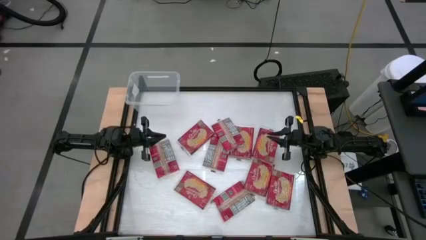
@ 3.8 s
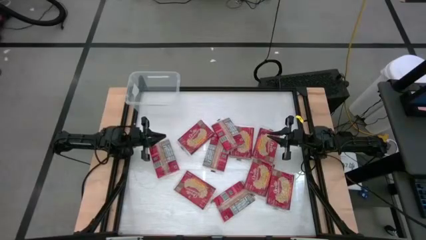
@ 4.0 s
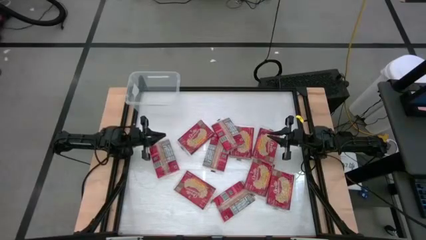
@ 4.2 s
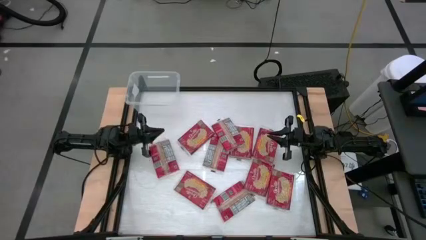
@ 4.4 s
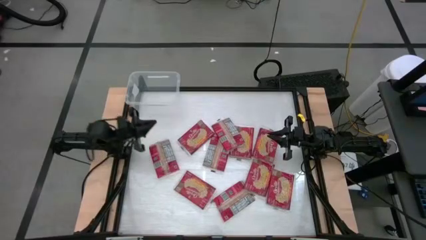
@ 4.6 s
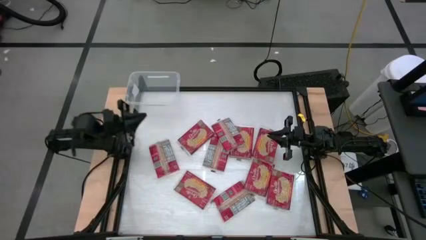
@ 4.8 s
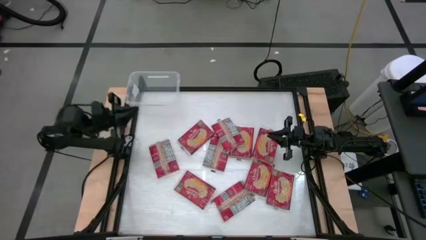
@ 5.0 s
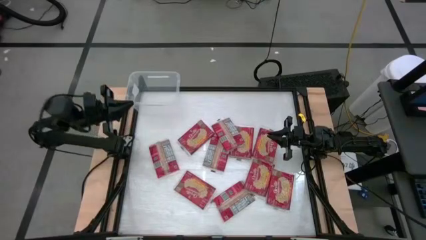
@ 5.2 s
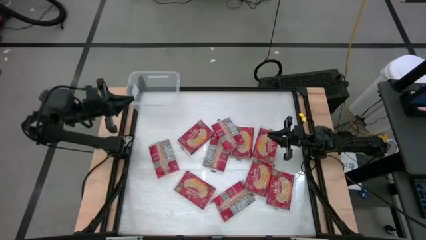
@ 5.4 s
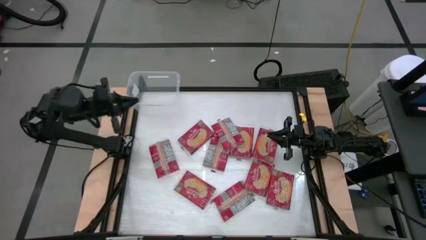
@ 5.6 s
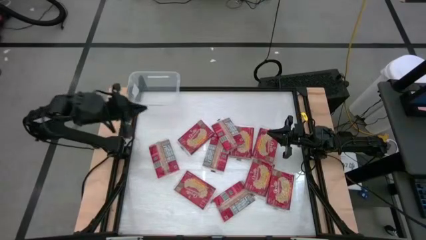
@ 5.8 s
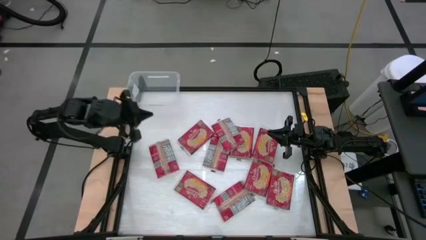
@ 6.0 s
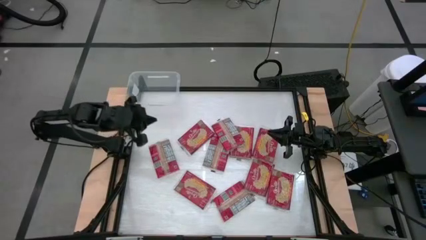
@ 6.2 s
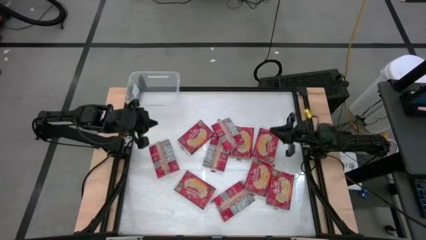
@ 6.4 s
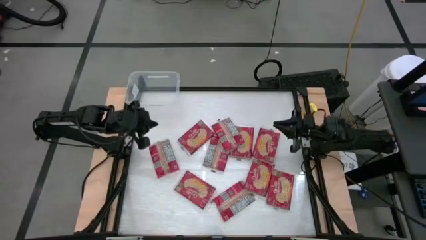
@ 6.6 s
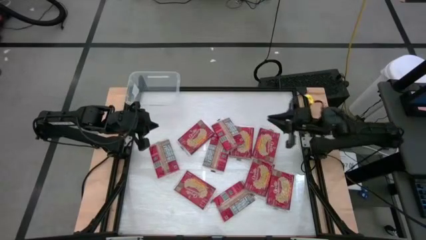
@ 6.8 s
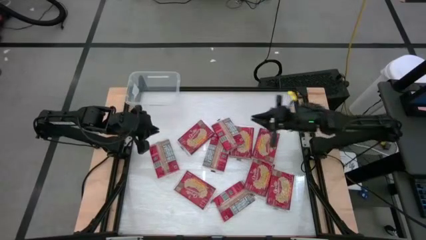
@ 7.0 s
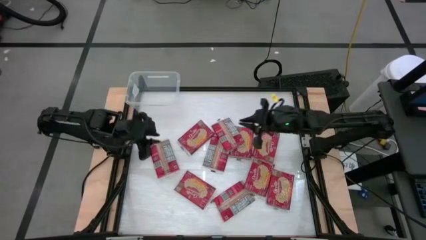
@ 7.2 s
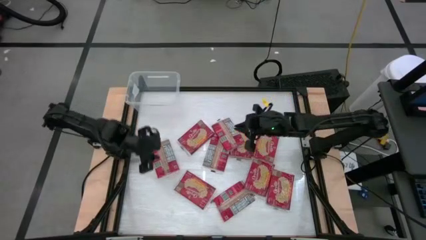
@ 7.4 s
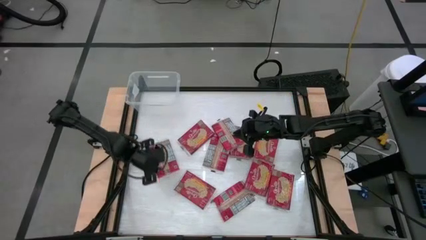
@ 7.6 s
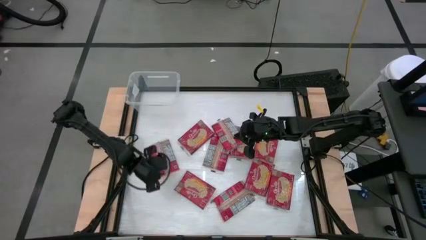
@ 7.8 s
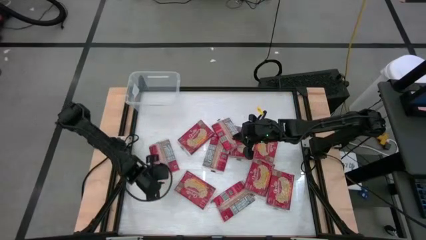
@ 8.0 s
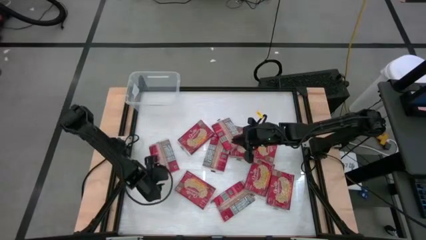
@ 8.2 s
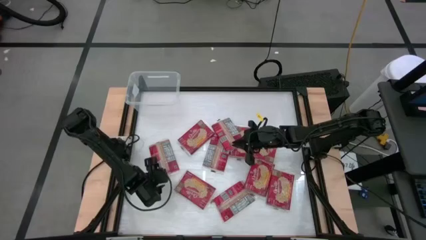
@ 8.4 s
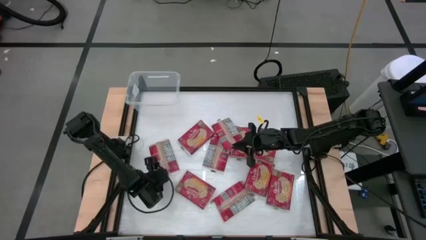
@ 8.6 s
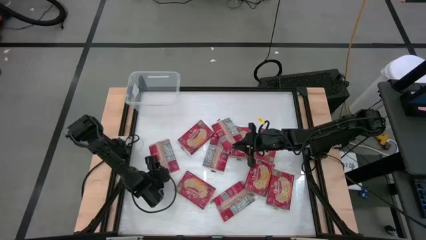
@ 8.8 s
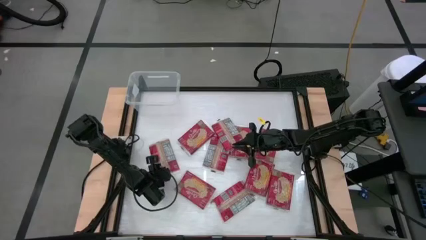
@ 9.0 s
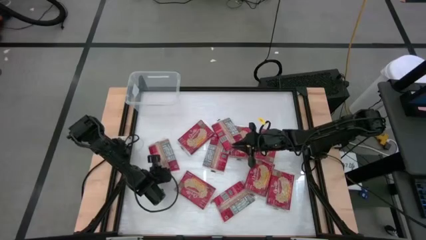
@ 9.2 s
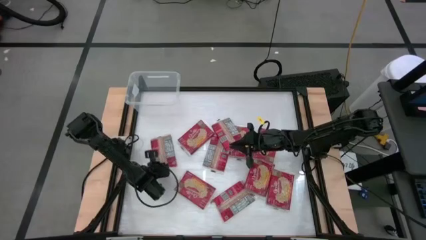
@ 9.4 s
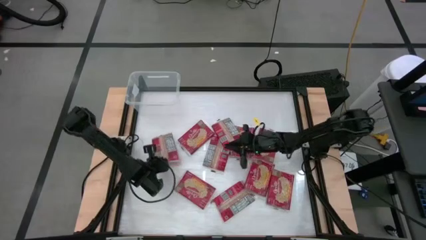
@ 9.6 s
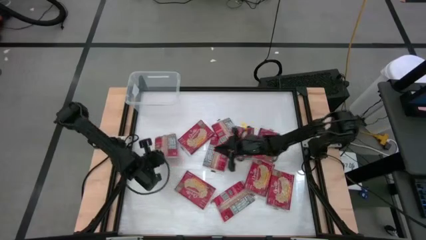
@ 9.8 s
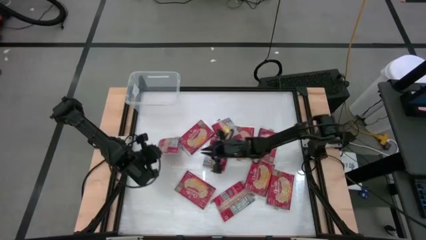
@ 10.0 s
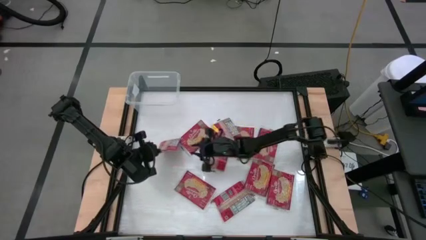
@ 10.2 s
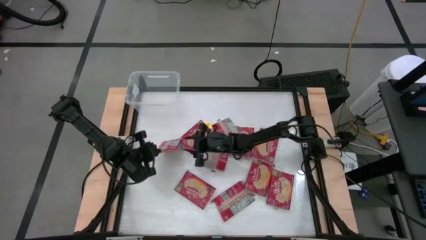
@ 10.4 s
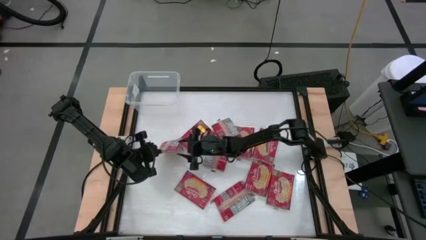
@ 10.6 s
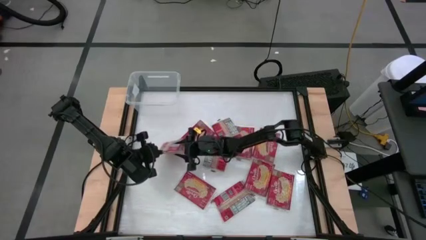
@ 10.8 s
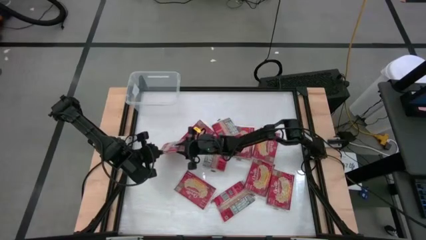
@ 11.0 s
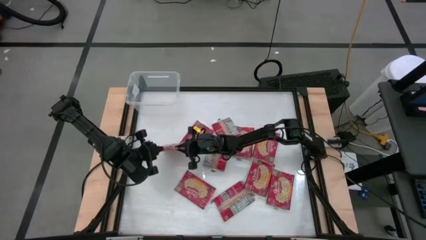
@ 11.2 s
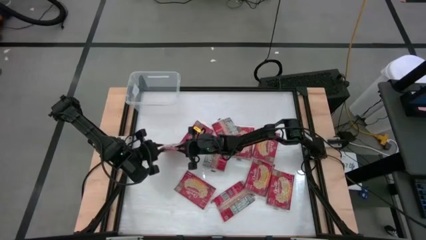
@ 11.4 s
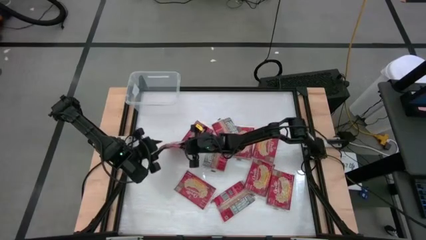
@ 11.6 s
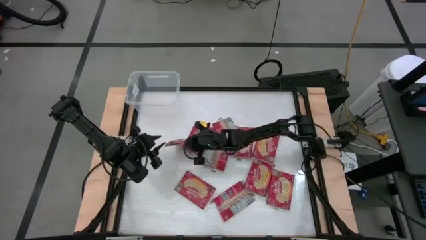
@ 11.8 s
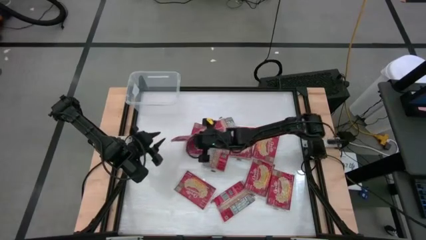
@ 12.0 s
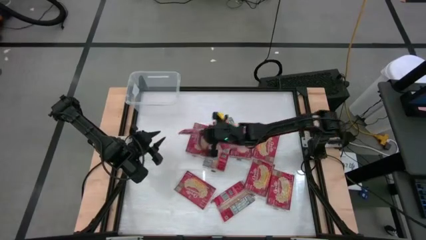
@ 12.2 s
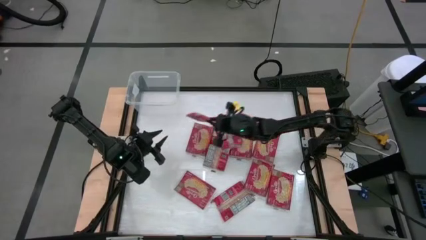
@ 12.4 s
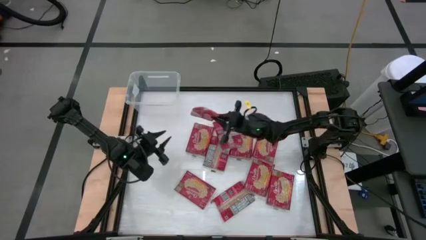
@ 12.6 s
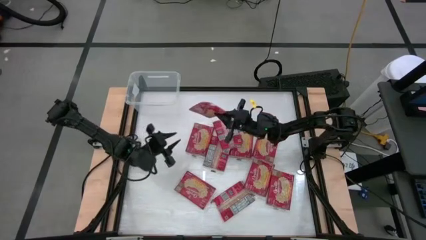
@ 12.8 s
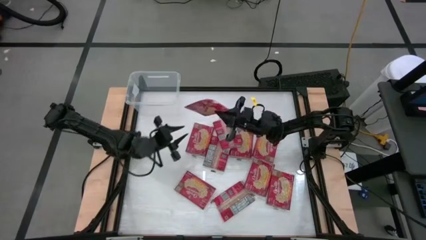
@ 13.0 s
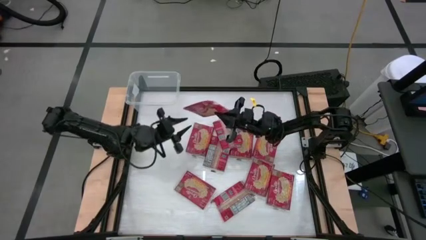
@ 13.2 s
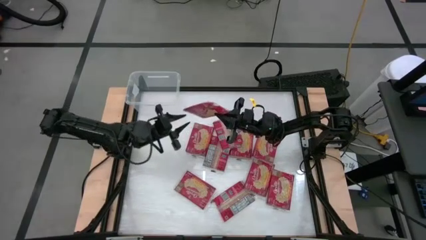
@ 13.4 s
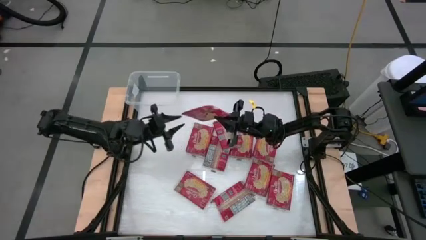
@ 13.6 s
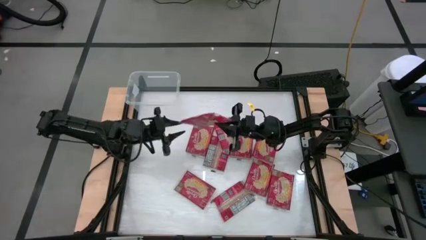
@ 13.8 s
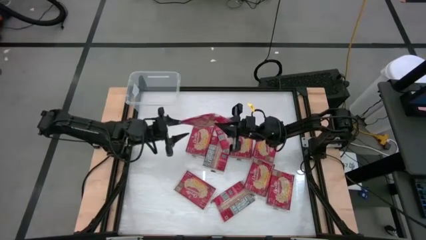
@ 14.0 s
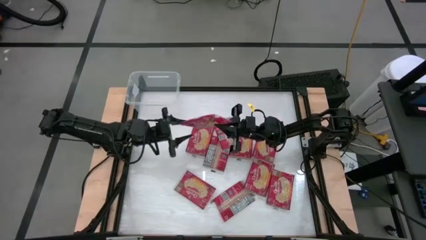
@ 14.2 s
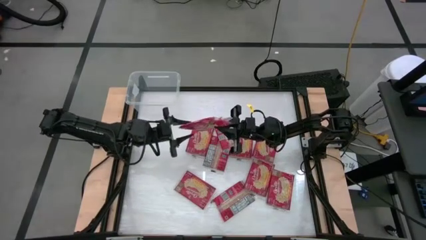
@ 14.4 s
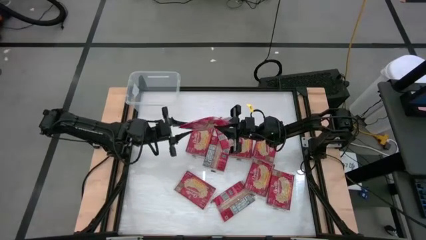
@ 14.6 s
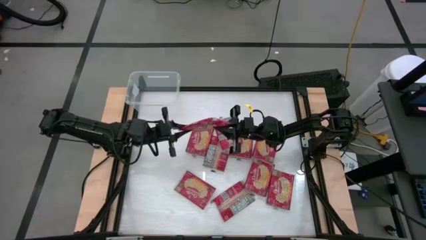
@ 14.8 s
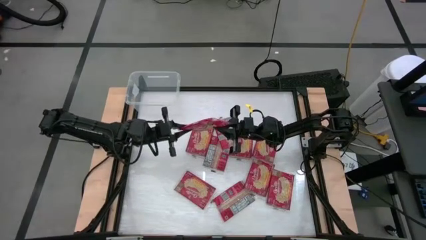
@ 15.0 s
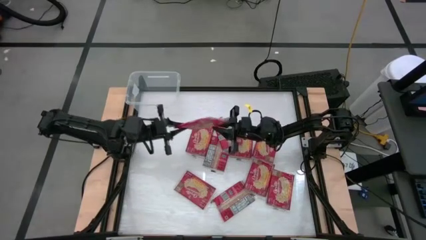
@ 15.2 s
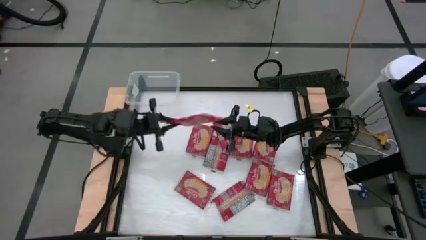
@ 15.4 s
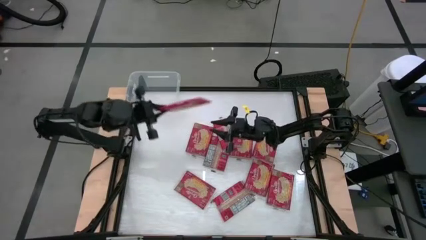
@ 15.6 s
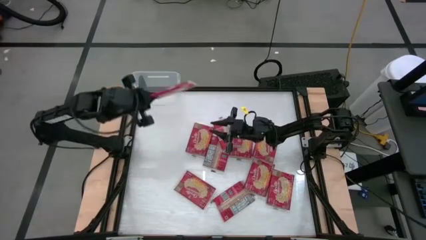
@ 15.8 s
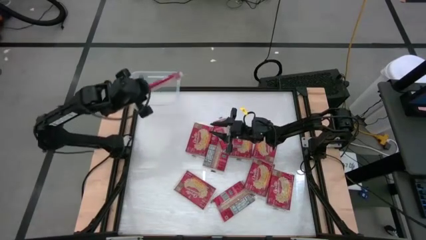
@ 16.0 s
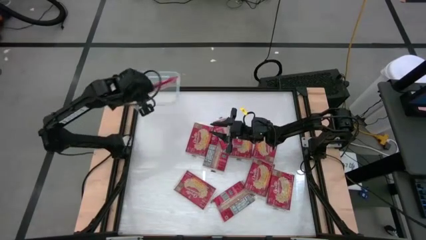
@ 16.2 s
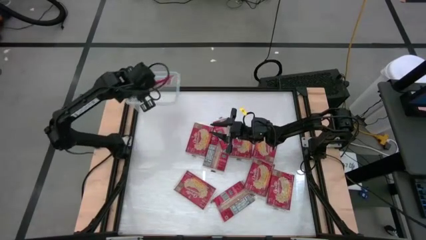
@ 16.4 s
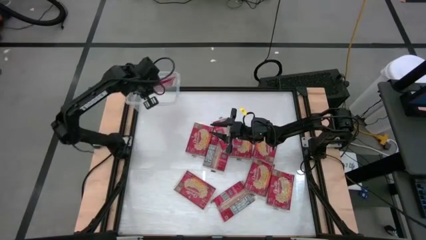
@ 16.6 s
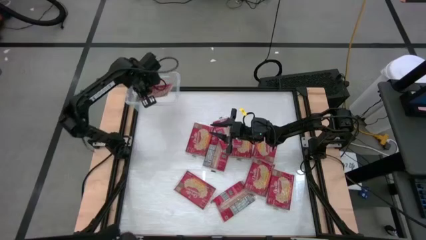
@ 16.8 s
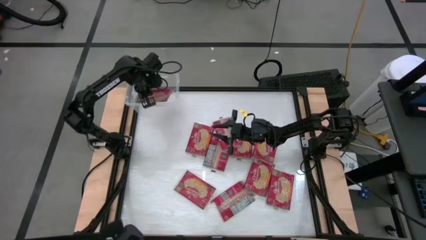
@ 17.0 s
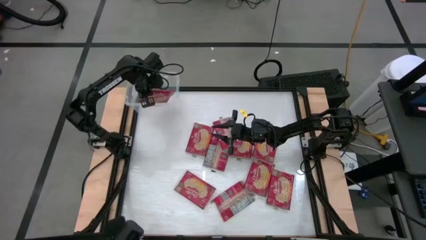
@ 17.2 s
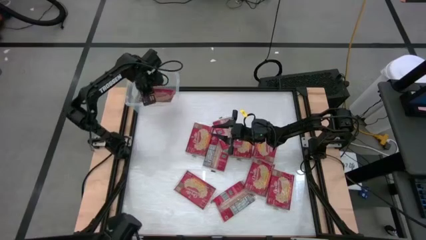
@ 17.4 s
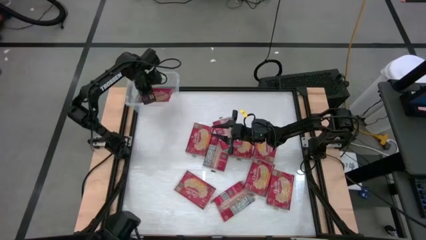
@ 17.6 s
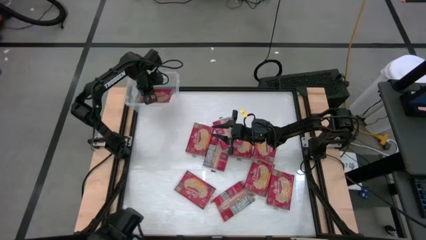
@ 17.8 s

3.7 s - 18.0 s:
Task: Sort popcorn bags into baskets
Put the red popcorn bag into the transparent container
